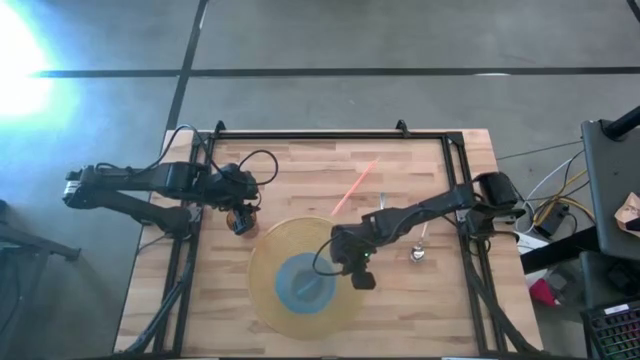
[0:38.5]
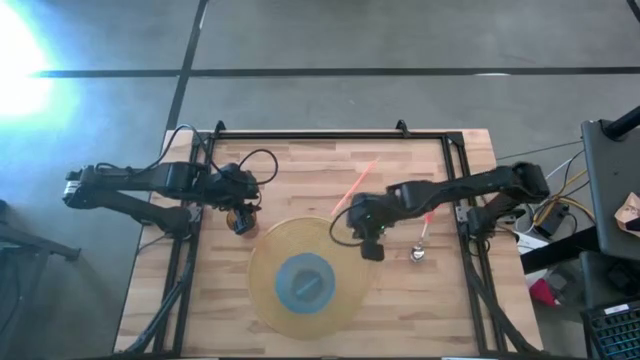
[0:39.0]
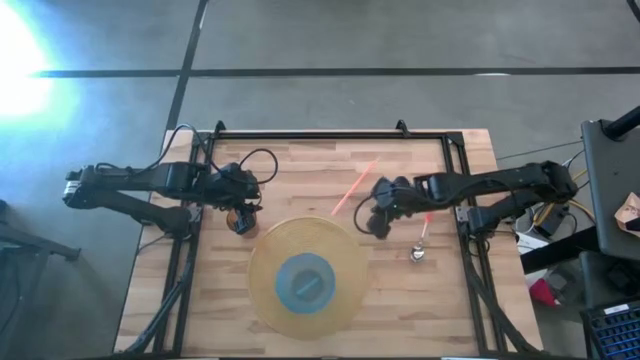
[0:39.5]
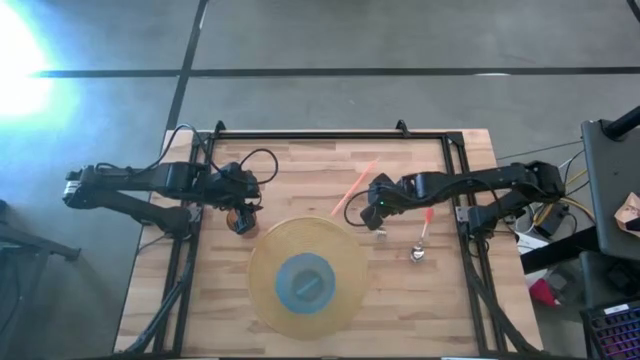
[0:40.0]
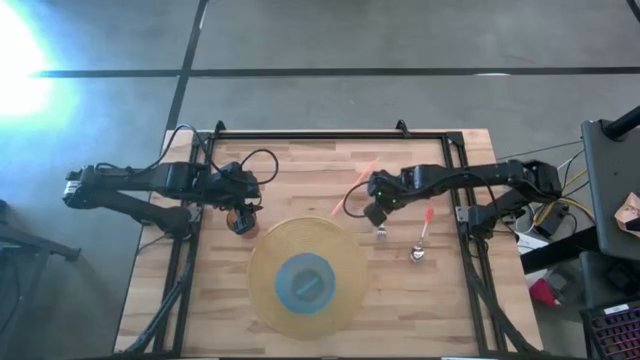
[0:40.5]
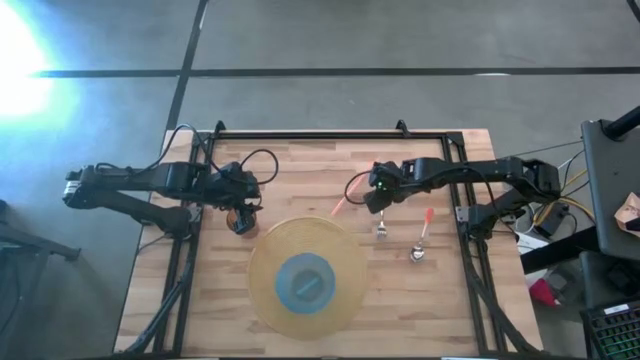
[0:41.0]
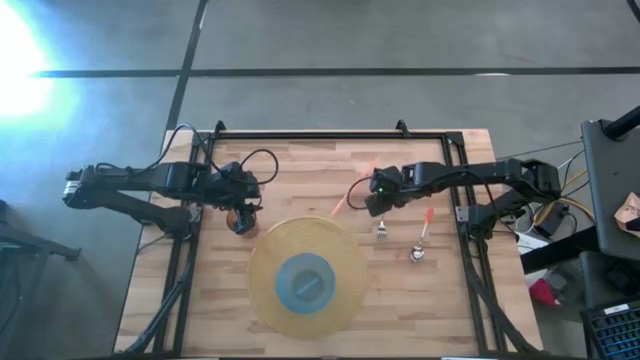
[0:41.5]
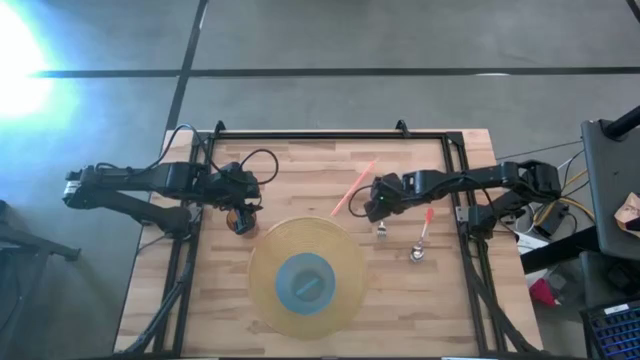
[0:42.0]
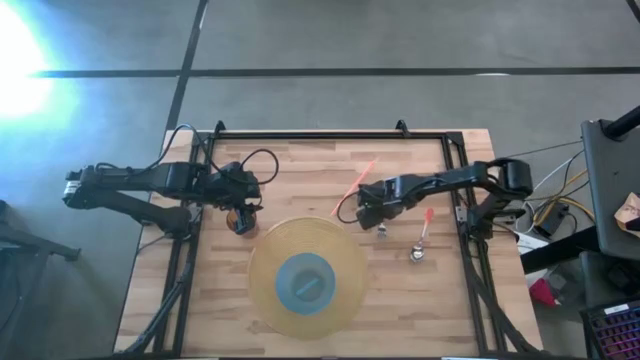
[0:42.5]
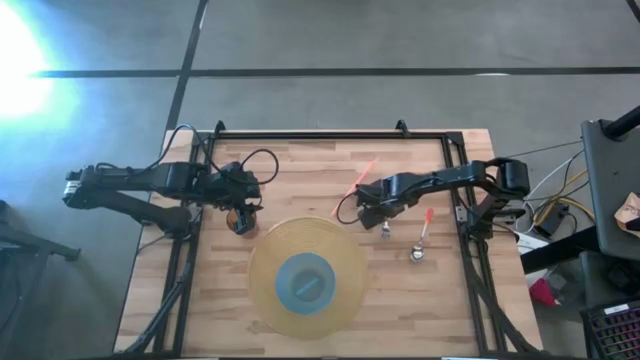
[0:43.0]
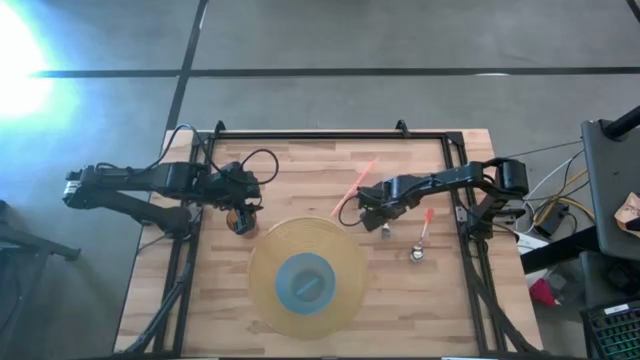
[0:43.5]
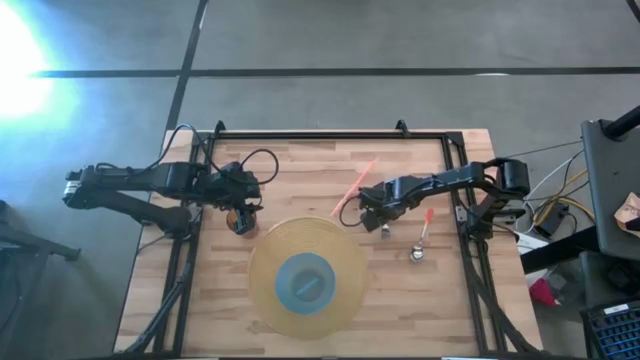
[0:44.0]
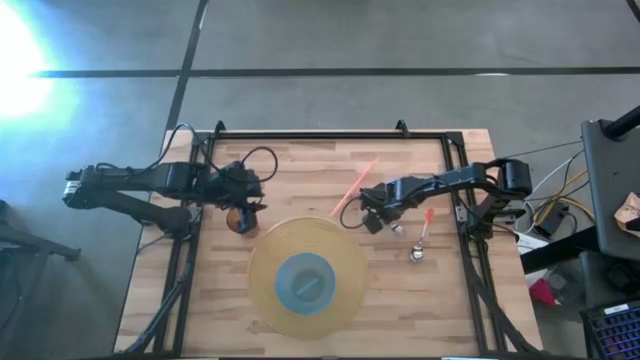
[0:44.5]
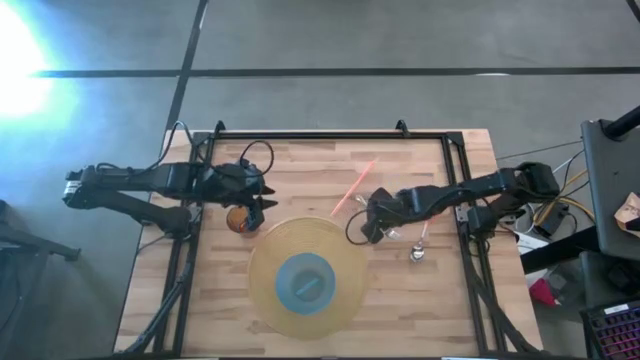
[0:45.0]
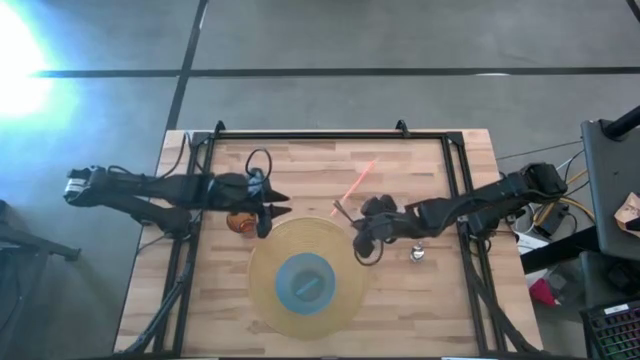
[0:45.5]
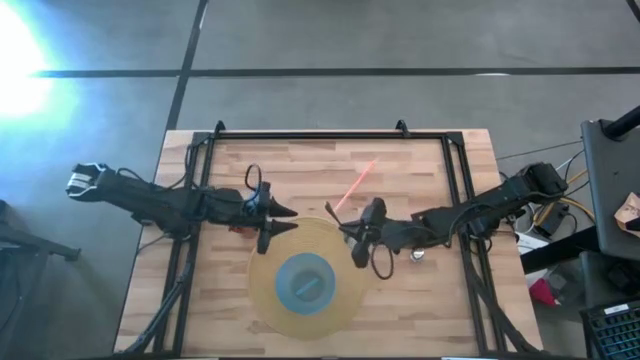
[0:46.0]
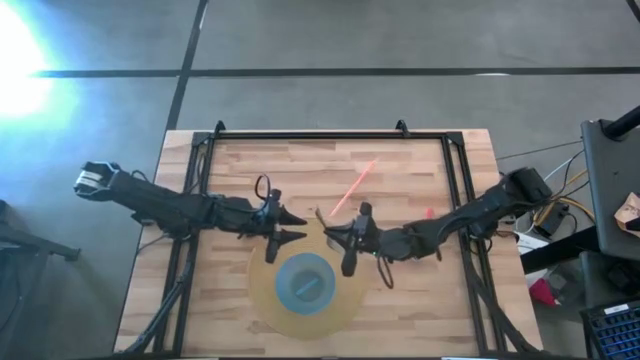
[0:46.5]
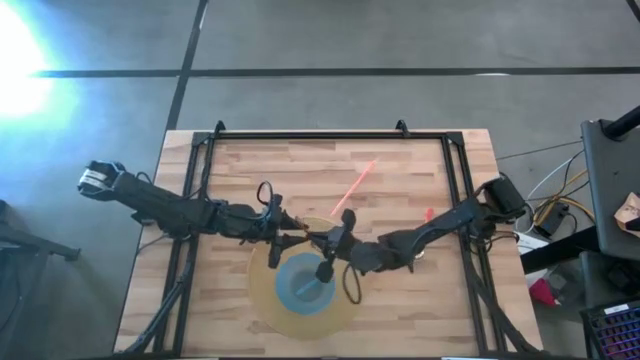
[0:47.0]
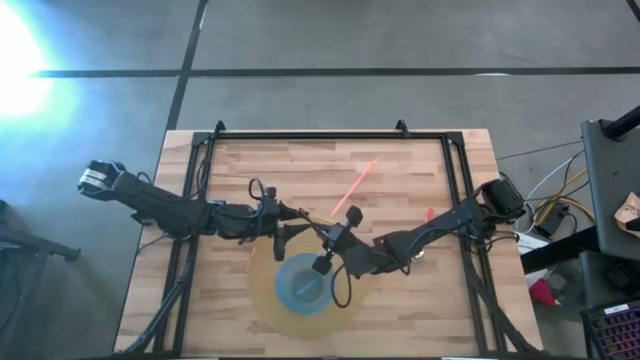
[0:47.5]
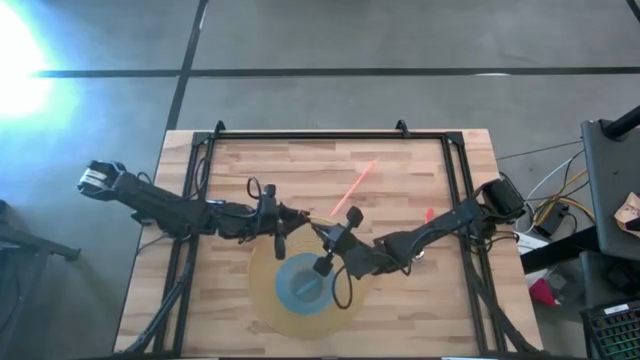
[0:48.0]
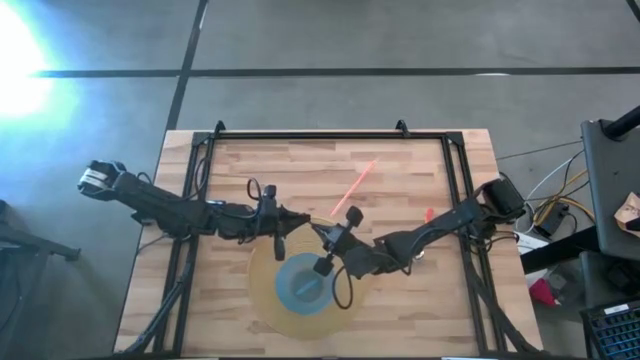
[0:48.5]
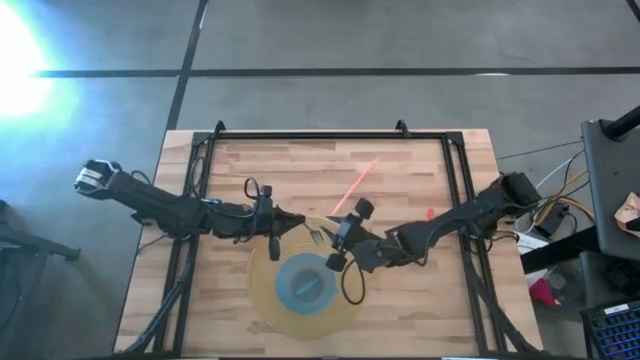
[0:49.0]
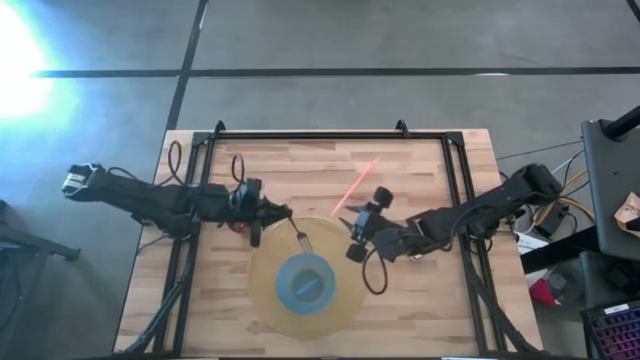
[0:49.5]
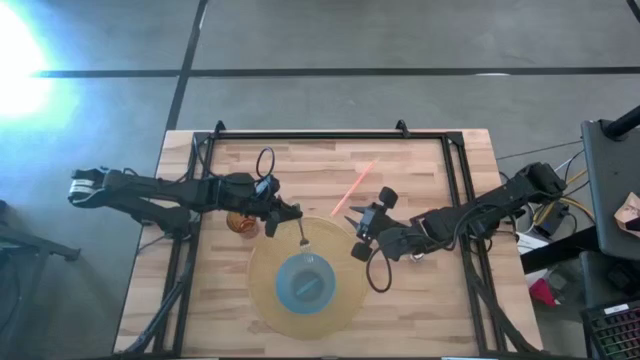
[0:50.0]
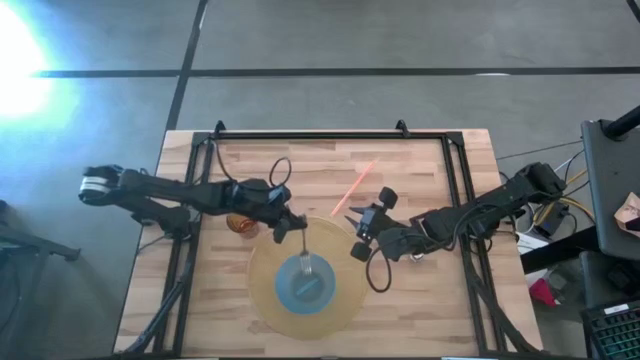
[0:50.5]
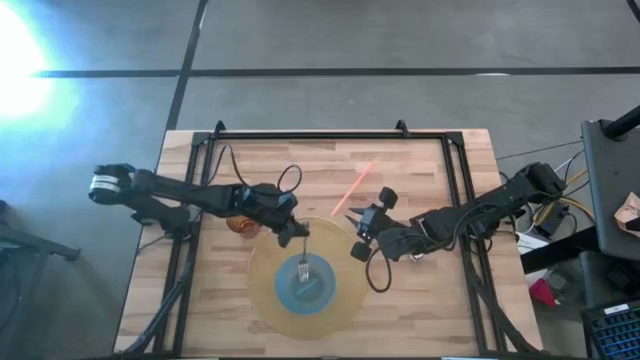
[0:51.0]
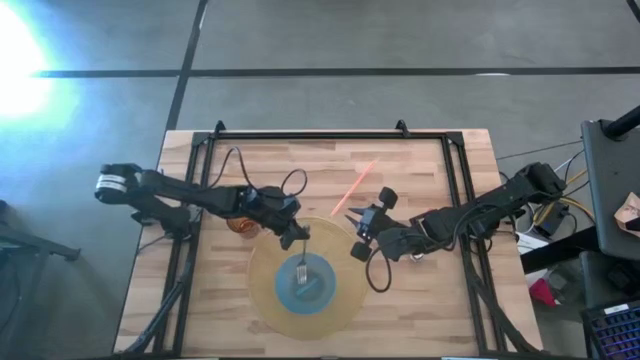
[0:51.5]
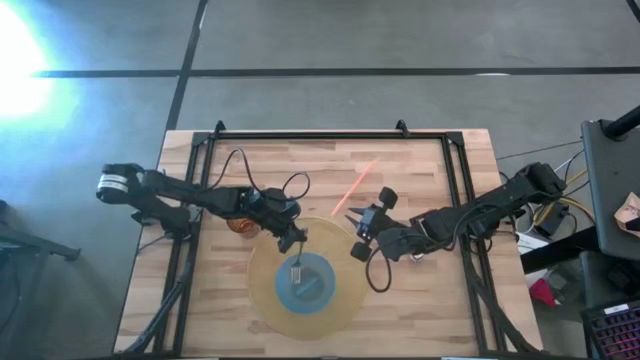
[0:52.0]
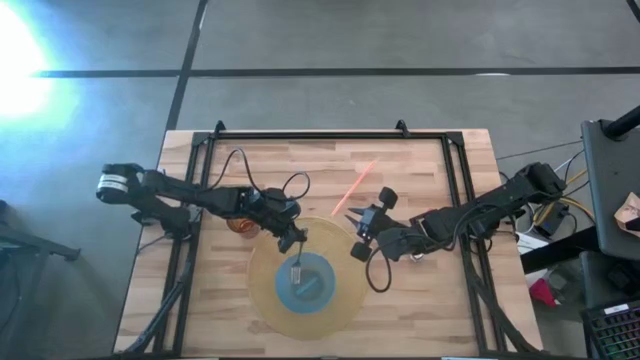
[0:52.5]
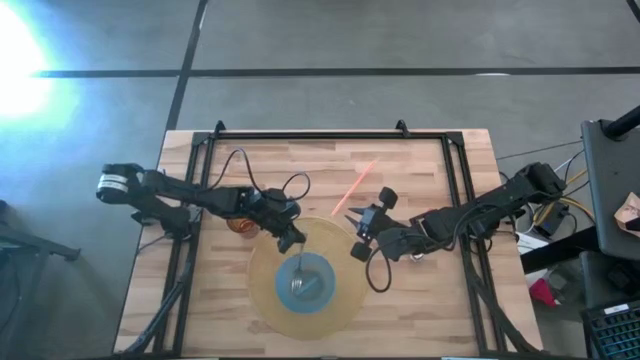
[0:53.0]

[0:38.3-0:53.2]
Task: Pick & Place Utensil
Put the silver fork into the blue bowl on the brown mat

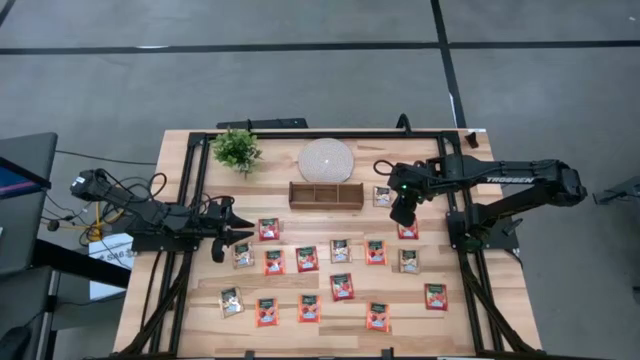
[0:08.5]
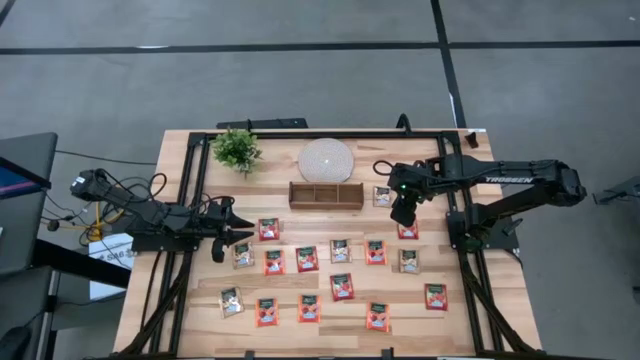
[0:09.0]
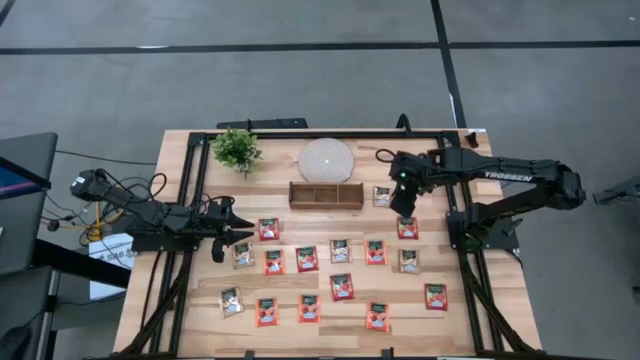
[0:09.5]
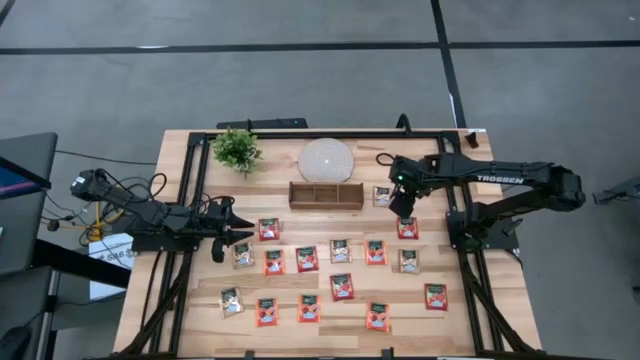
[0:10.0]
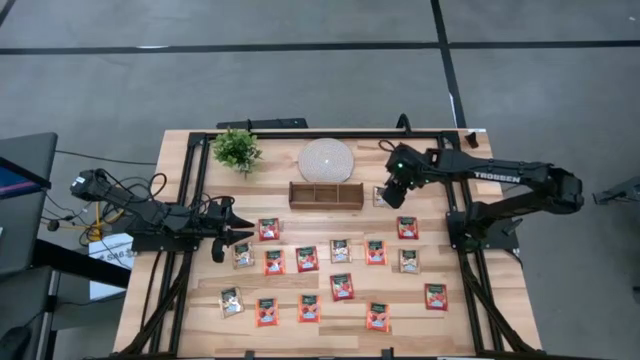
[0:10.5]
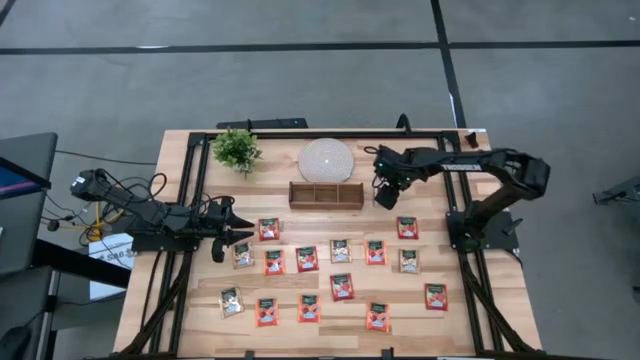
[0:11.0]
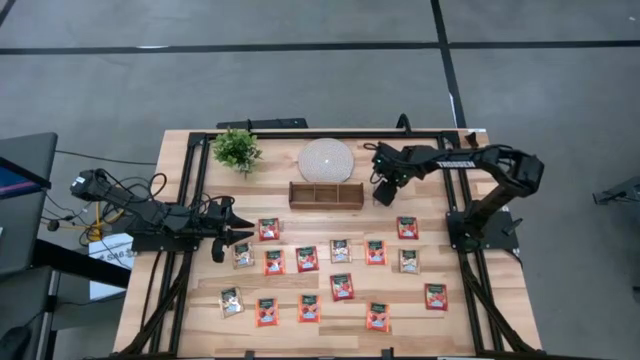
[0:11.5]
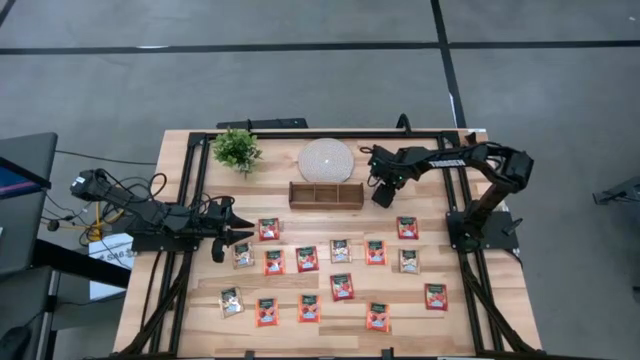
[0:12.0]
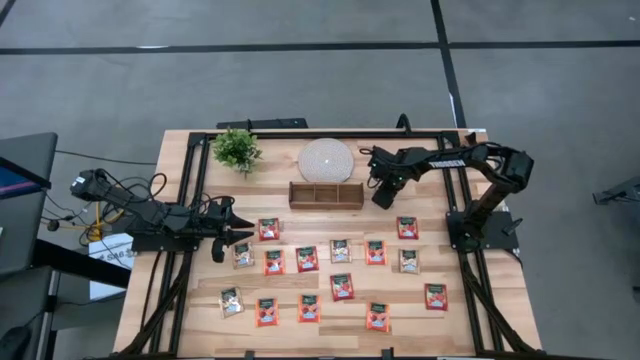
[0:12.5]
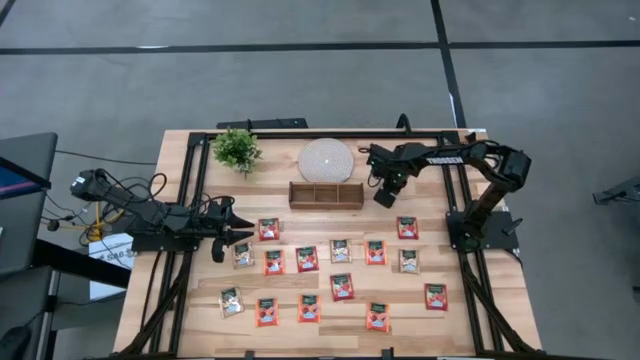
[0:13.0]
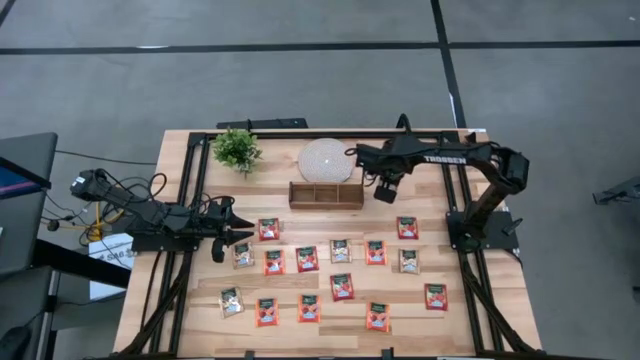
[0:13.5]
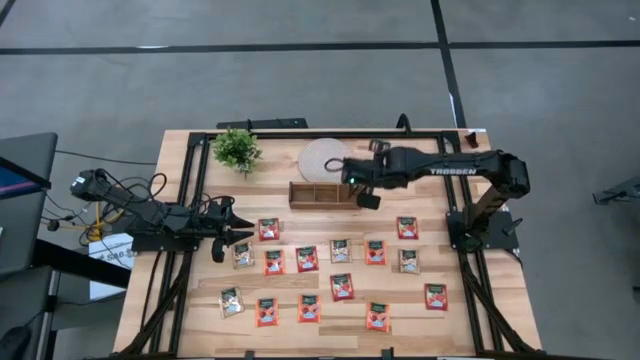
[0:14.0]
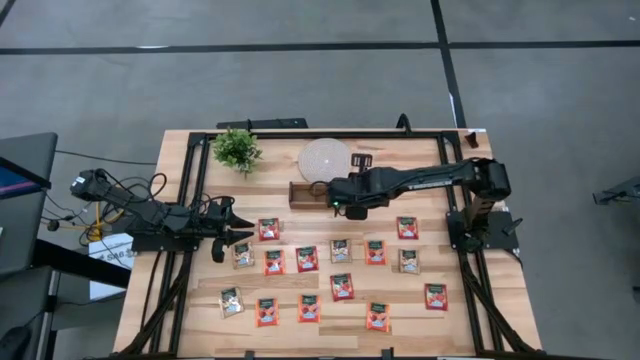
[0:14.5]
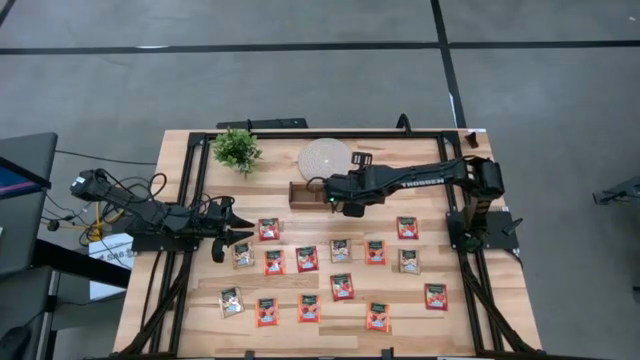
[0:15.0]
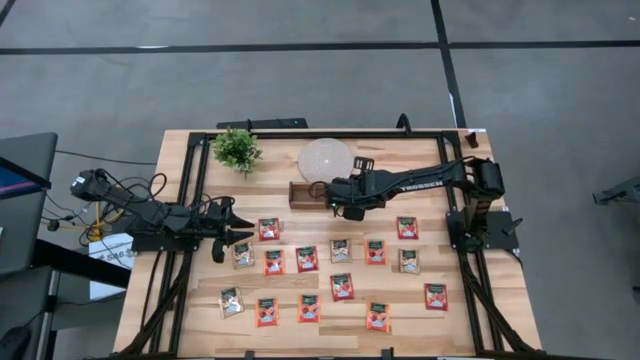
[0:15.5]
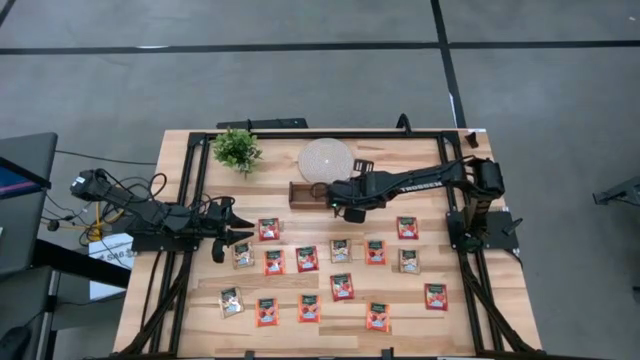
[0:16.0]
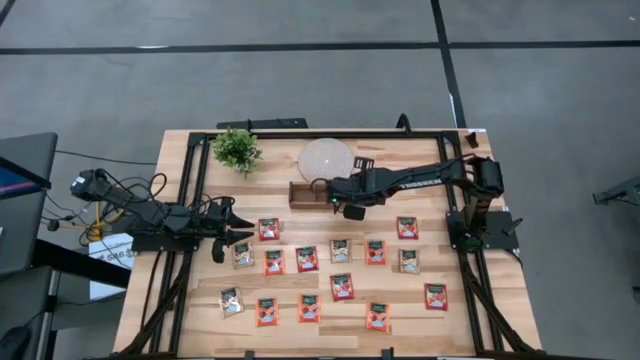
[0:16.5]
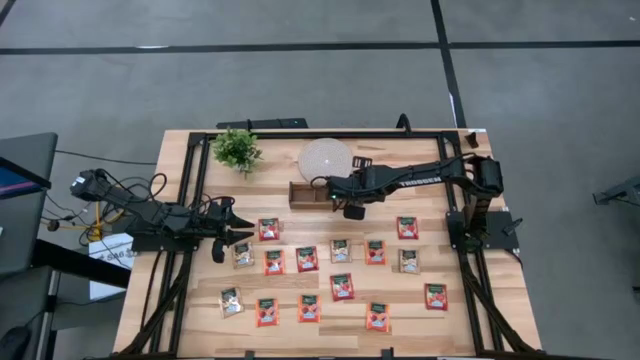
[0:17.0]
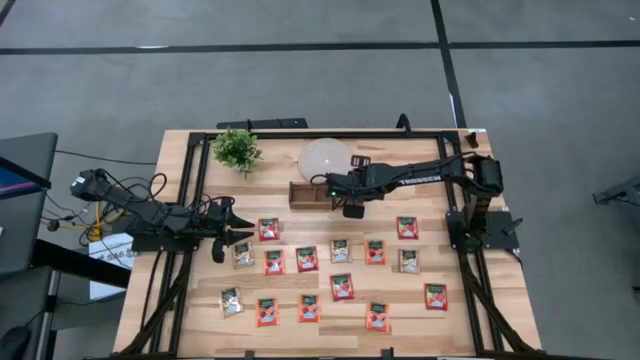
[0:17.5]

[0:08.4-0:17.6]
Task: Pick & Place Tea
Put the brown tea bag into the right section of the wooden organizer
